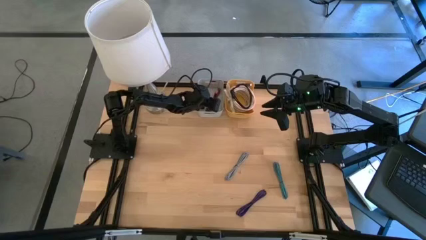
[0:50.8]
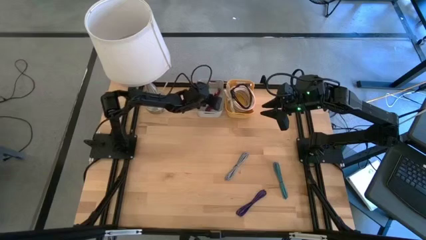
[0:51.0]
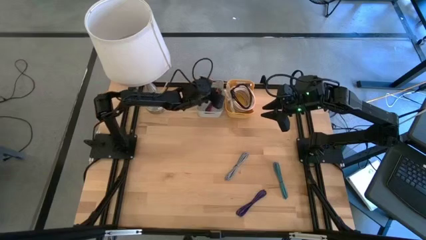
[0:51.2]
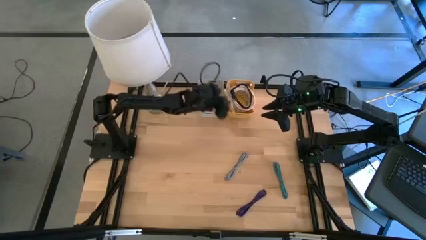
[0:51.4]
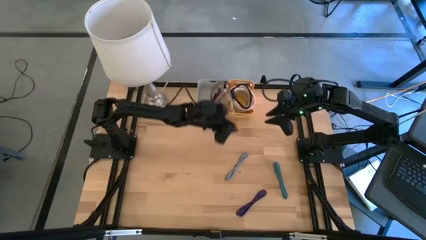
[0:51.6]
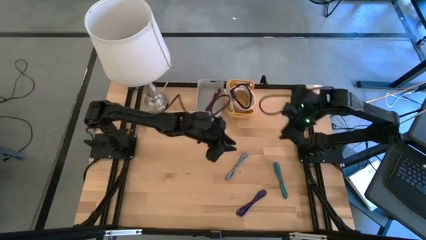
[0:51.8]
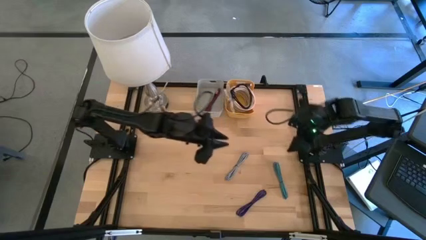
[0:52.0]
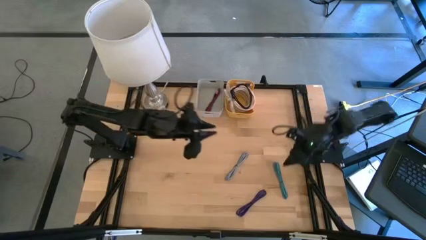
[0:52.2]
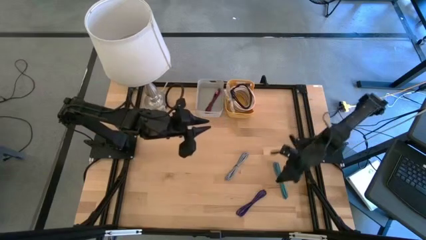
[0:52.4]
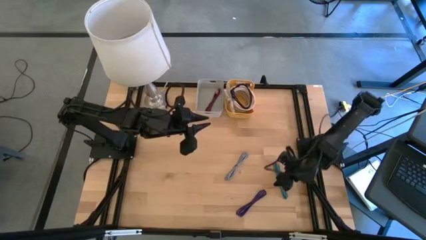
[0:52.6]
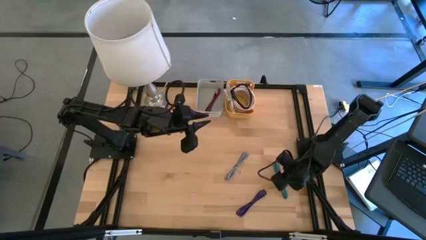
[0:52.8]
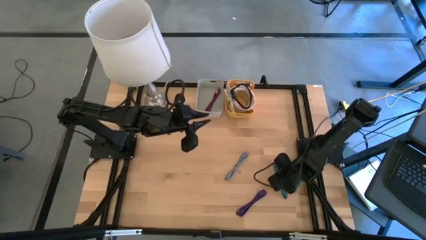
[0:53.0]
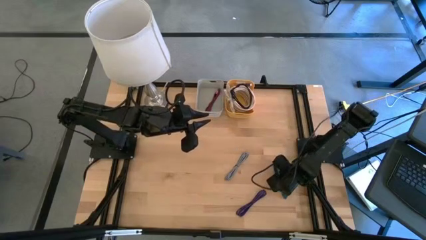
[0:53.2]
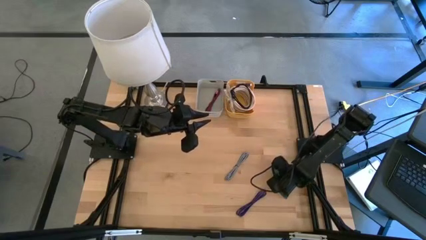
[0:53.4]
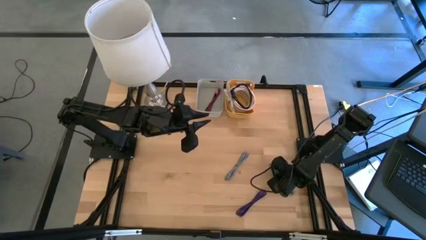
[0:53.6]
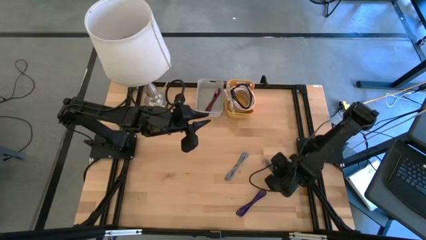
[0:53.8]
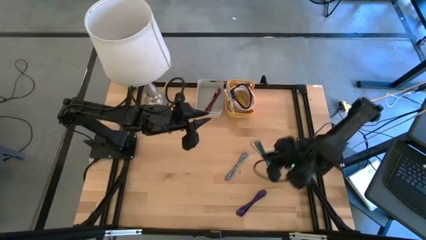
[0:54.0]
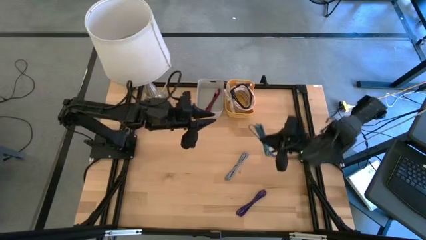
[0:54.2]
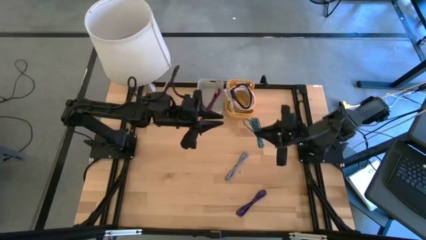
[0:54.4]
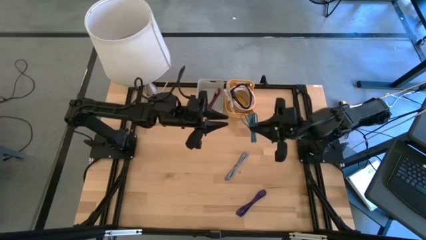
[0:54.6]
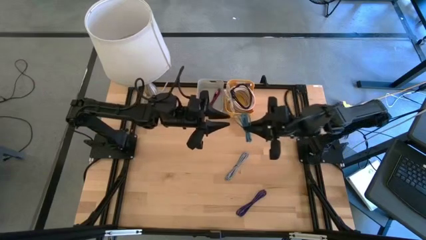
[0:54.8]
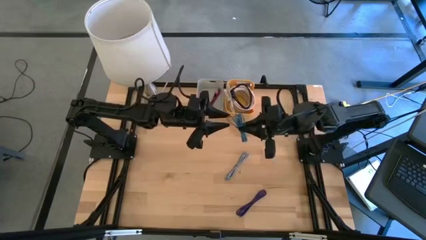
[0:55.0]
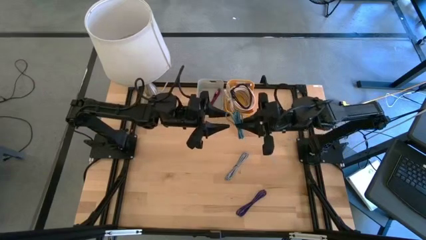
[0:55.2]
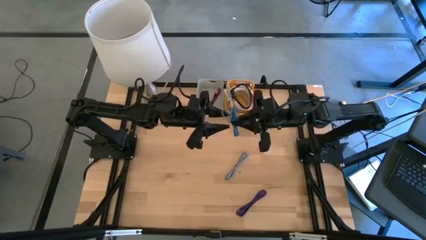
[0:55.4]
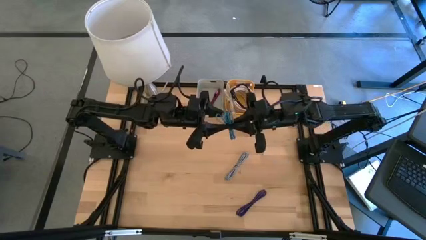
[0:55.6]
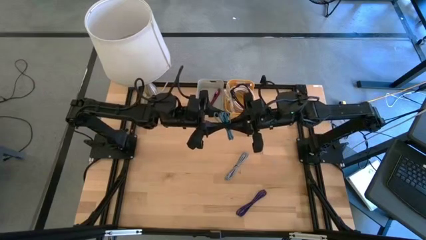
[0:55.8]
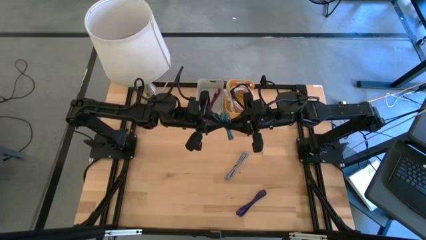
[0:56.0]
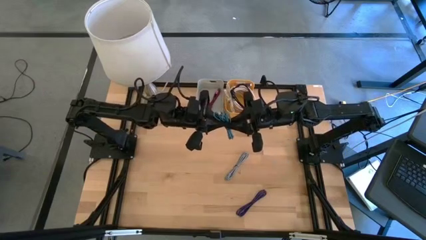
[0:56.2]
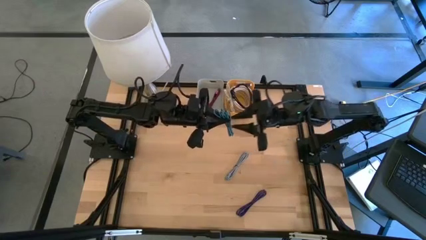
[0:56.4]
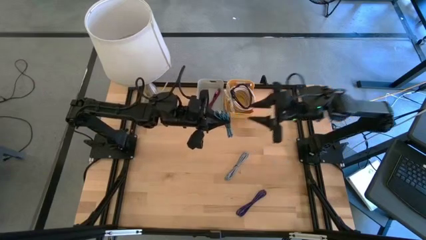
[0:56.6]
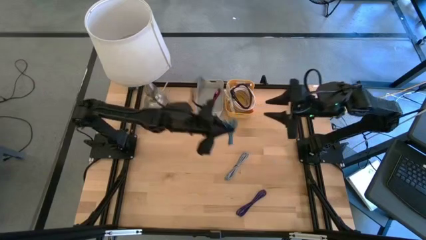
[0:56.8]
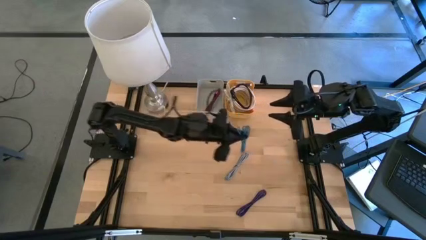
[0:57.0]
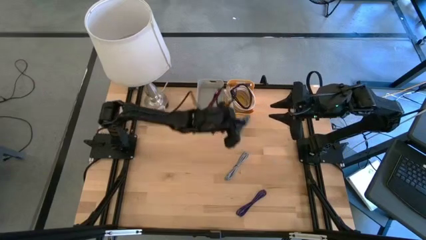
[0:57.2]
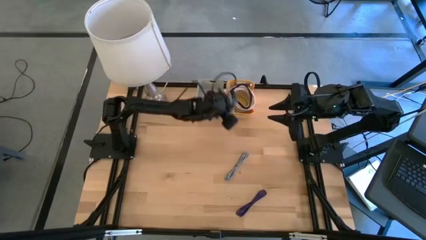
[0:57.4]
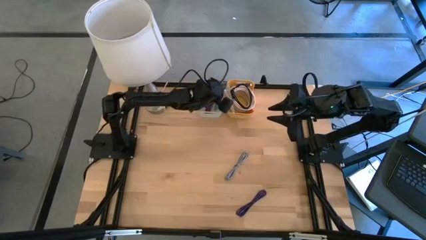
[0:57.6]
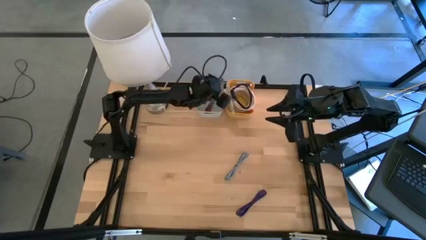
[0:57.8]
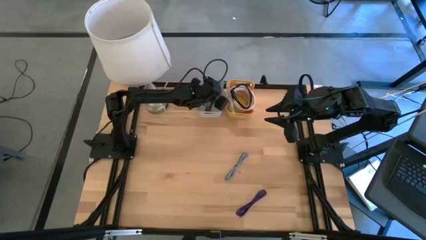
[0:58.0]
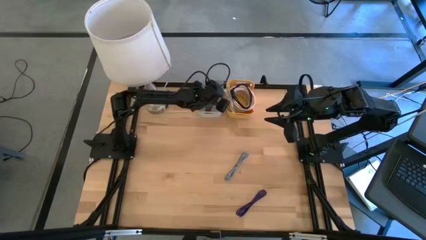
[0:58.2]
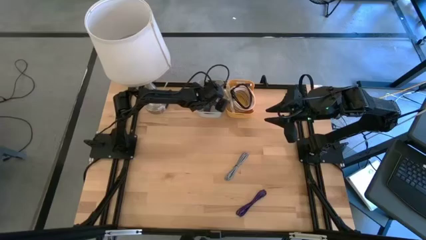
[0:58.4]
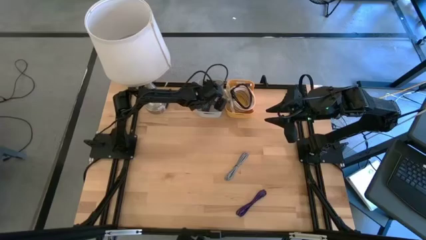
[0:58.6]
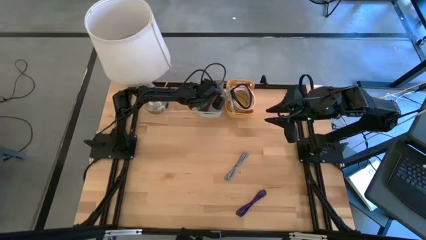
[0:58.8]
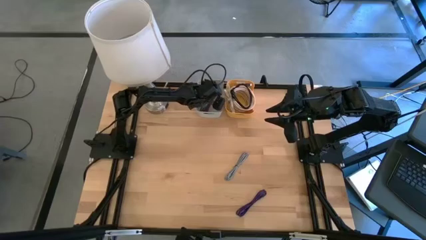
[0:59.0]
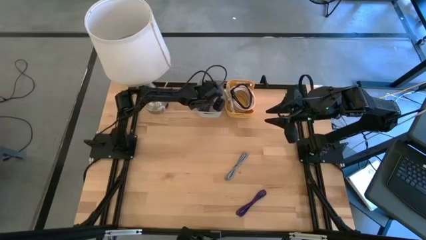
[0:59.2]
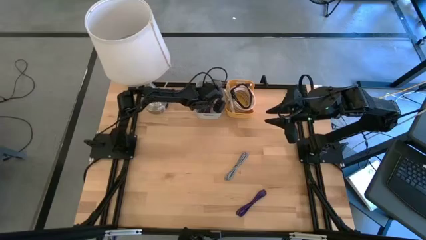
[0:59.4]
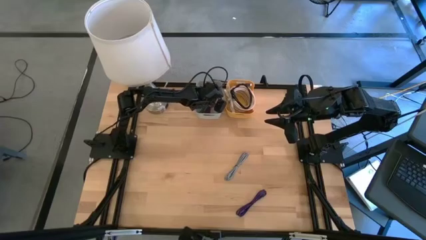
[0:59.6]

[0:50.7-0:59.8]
Put the light blue USB cable into the gray bin

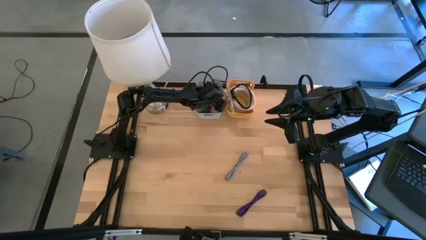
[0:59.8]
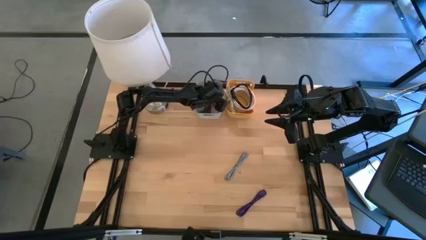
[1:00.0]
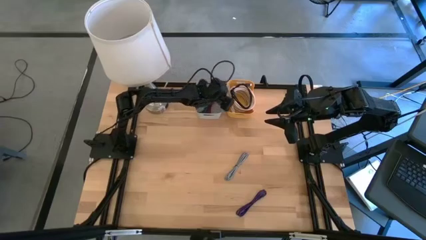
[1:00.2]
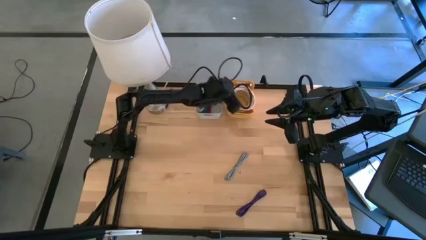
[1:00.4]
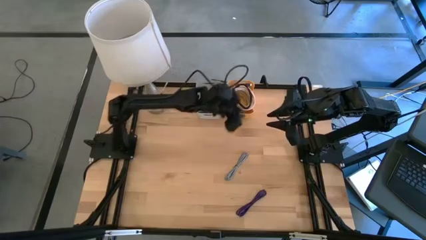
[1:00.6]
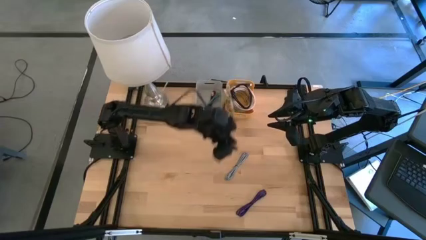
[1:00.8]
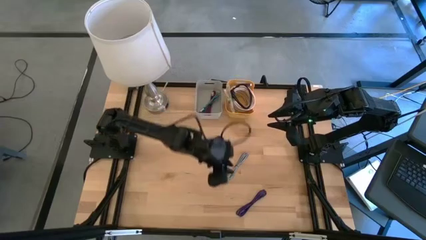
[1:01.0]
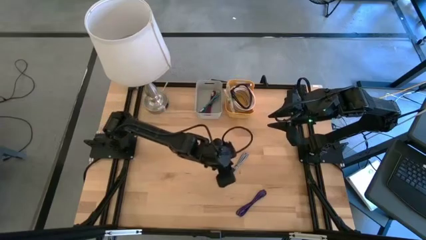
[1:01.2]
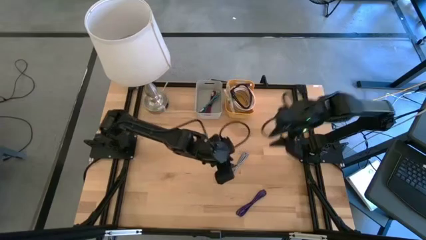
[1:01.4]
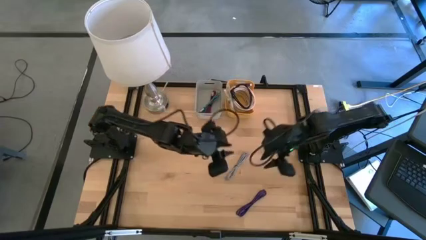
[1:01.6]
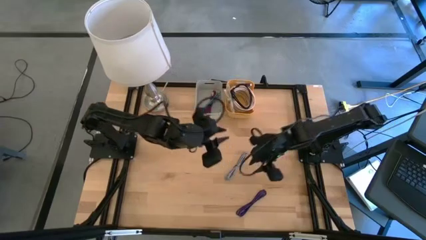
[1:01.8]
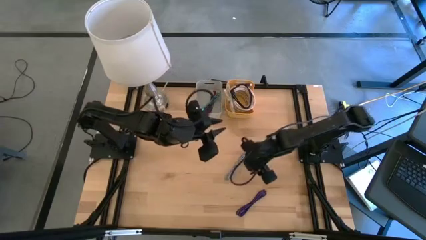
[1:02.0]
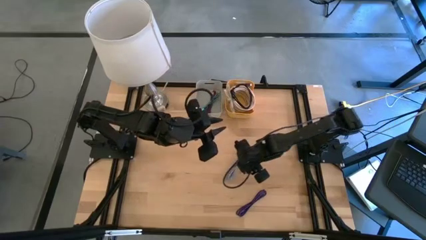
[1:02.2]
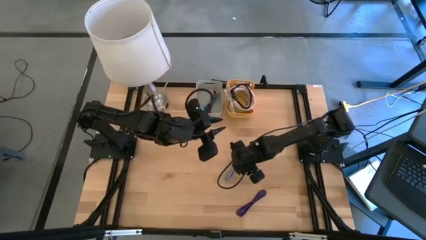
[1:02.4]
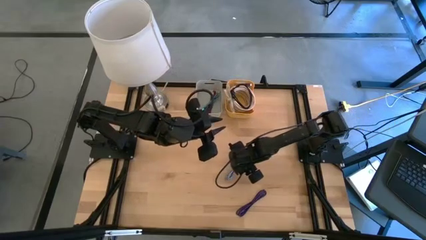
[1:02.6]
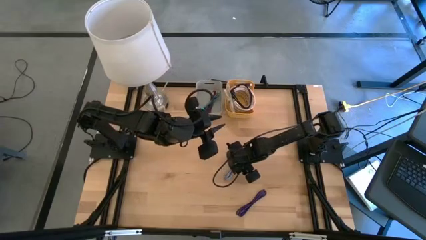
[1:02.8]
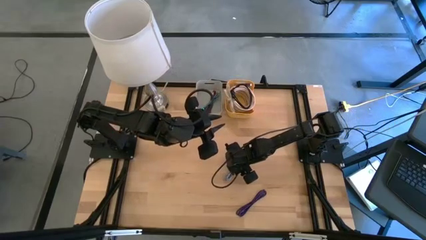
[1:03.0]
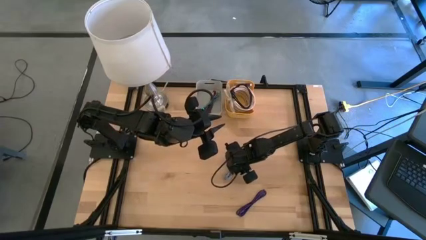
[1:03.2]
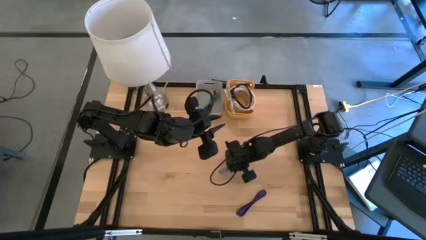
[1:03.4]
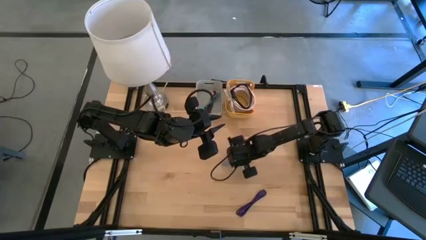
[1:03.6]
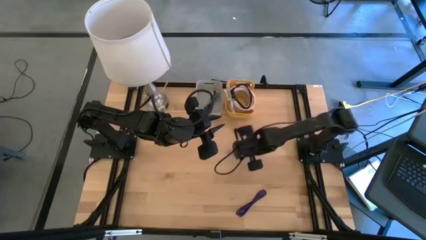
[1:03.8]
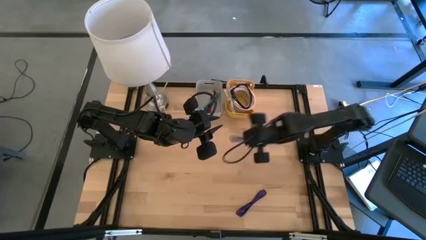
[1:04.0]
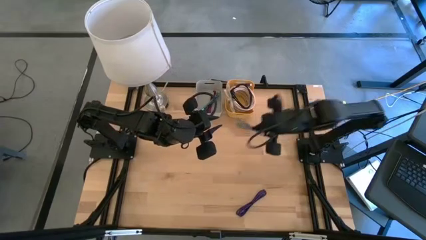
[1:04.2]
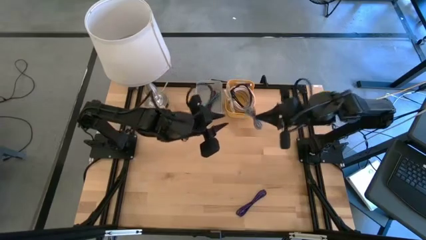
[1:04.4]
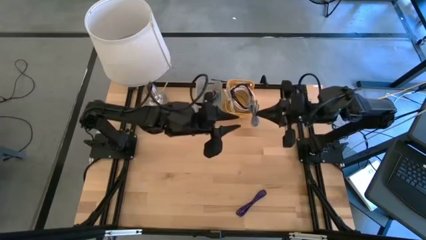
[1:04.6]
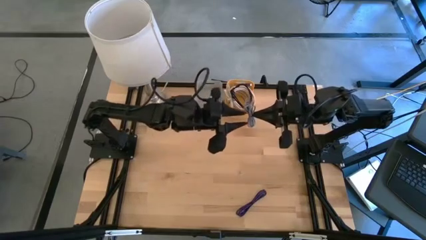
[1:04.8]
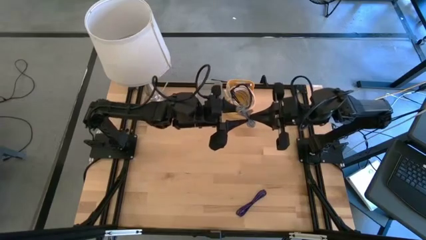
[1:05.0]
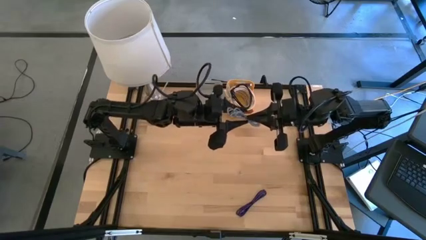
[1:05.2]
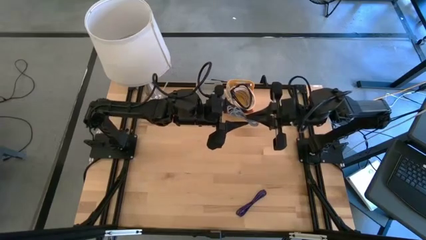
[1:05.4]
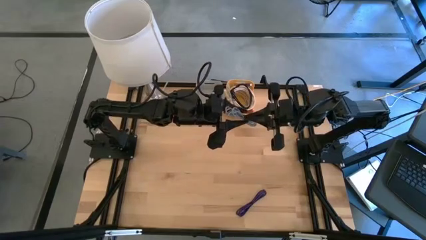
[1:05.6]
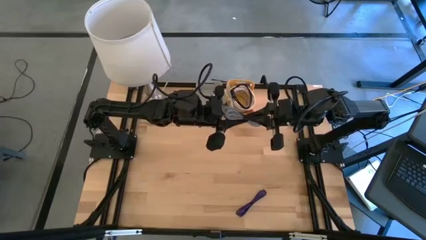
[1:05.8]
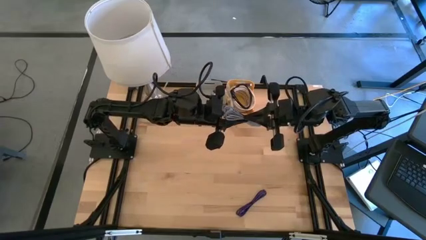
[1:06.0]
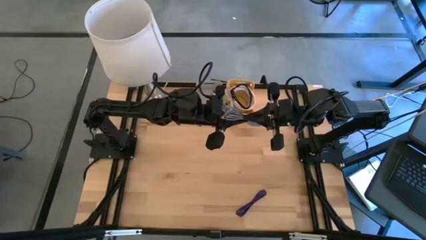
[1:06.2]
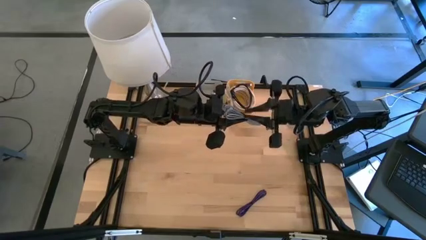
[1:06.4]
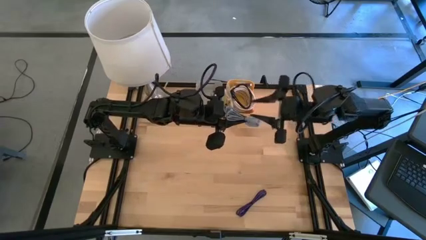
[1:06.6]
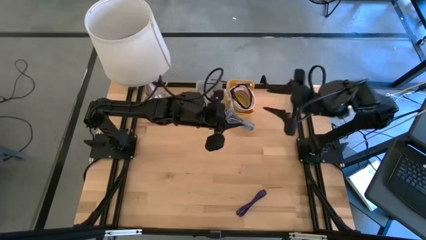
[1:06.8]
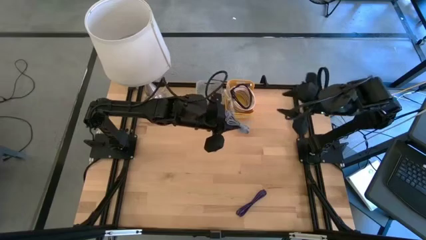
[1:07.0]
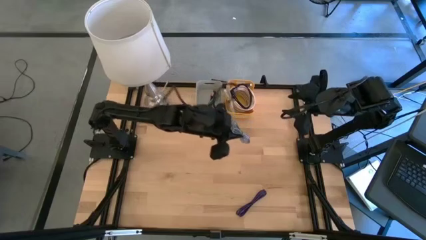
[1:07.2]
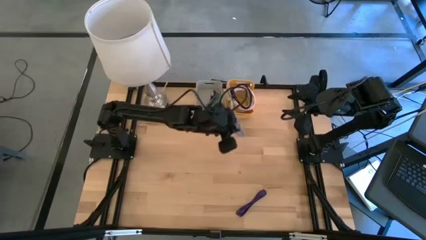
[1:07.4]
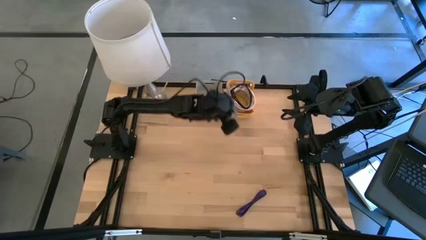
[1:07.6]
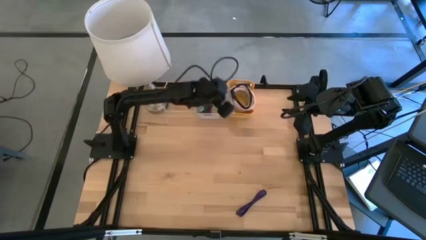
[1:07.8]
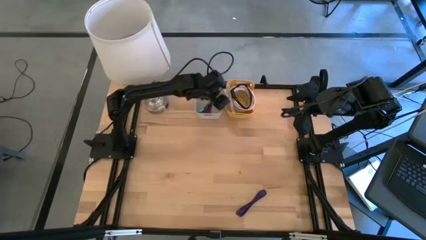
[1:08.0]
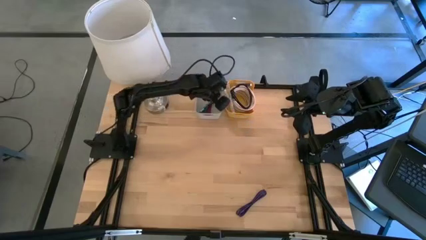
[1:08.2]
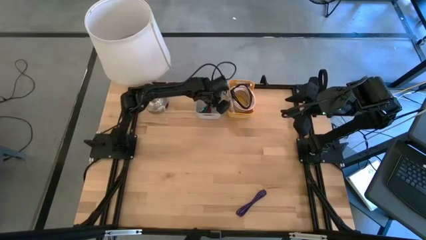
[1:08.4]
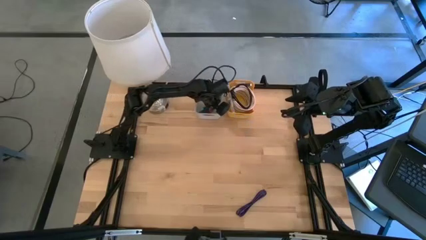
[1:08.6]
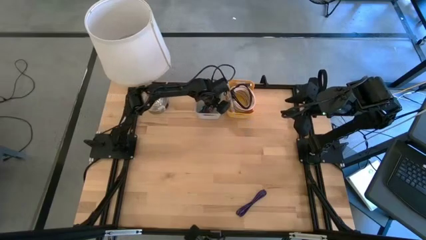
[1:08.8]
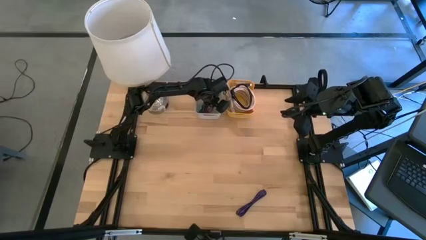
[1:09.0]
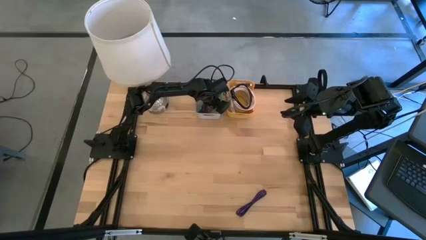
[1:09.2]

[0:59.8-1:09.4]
Put the white and black USB cable into the gray bin
